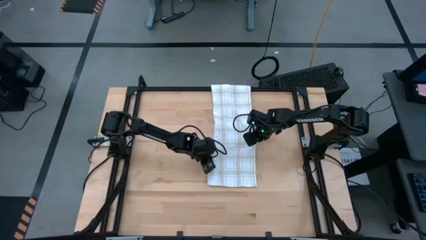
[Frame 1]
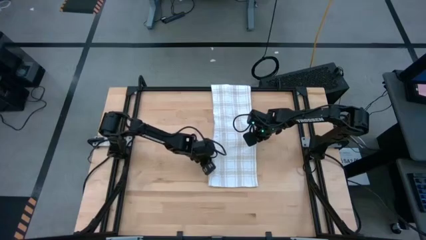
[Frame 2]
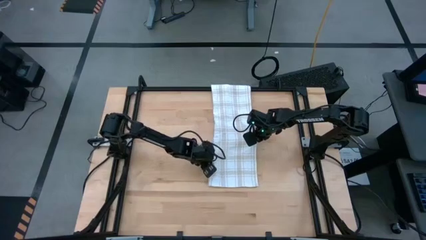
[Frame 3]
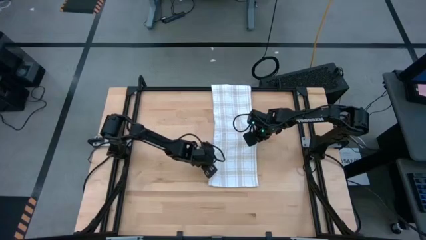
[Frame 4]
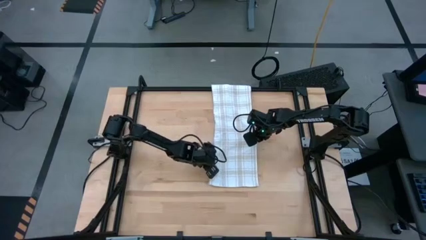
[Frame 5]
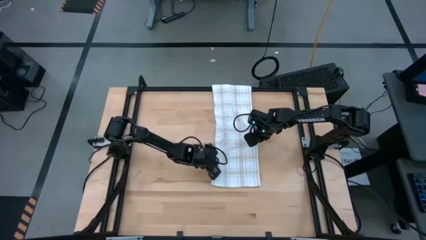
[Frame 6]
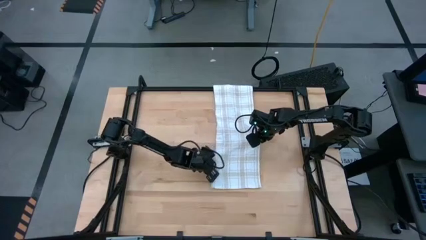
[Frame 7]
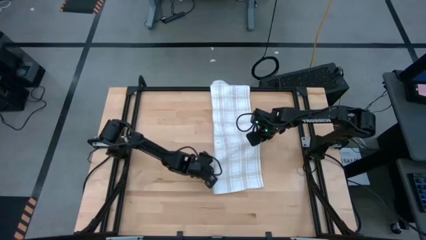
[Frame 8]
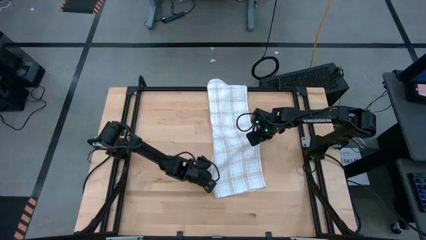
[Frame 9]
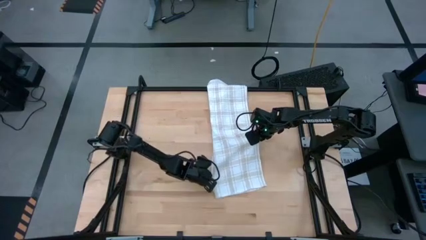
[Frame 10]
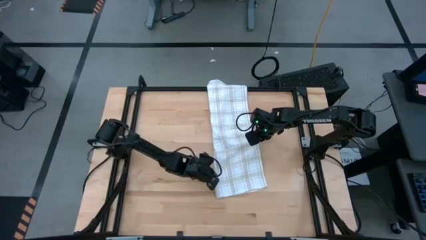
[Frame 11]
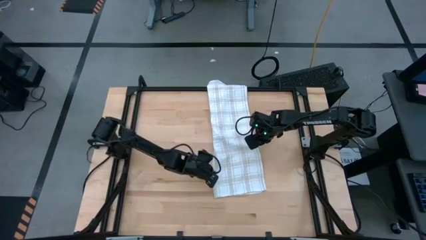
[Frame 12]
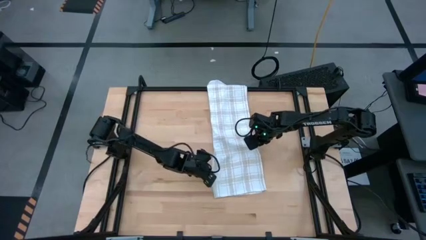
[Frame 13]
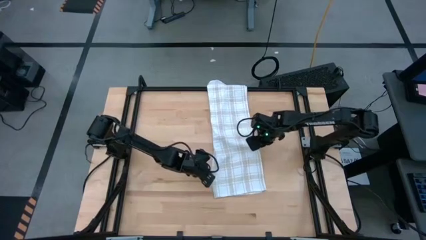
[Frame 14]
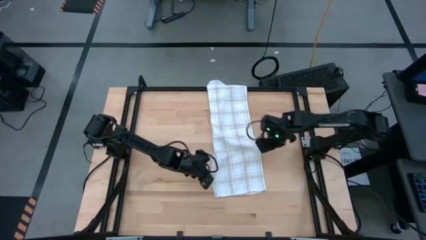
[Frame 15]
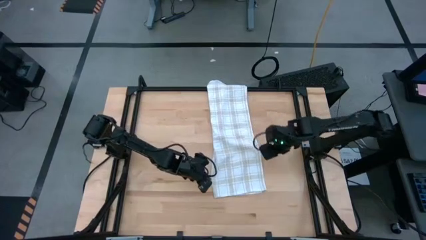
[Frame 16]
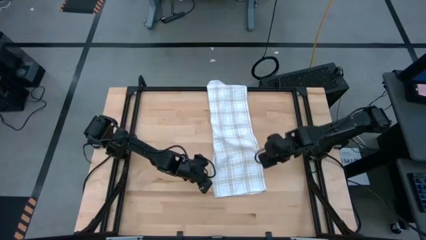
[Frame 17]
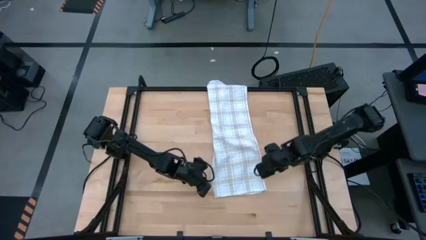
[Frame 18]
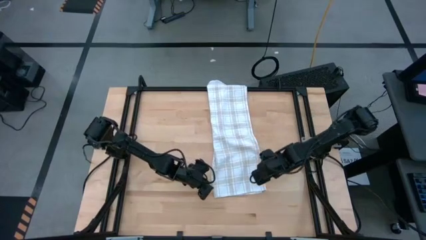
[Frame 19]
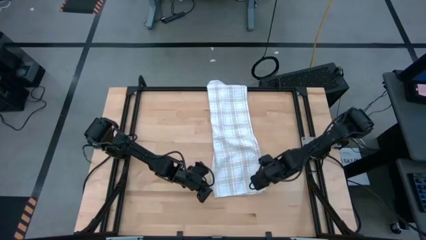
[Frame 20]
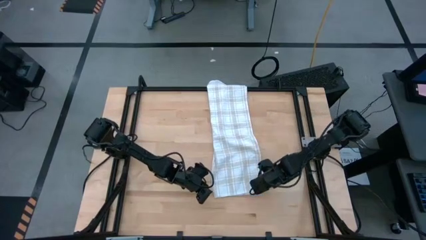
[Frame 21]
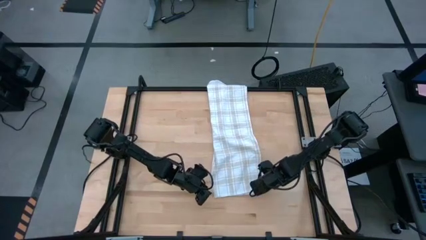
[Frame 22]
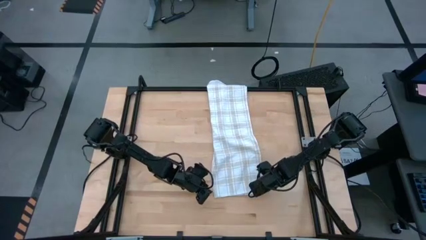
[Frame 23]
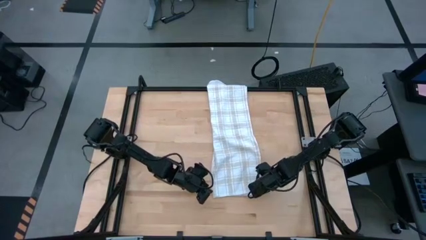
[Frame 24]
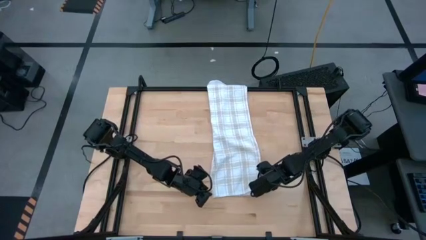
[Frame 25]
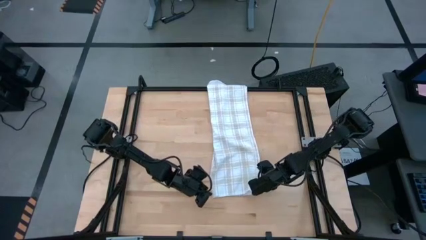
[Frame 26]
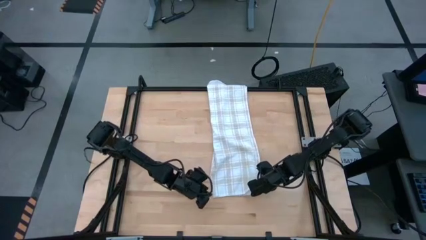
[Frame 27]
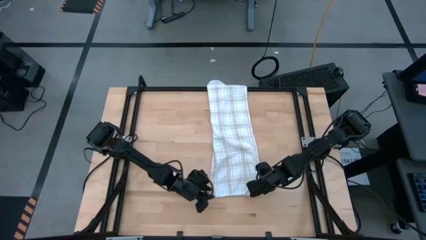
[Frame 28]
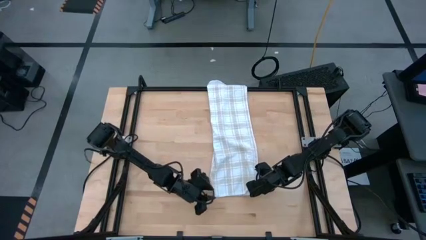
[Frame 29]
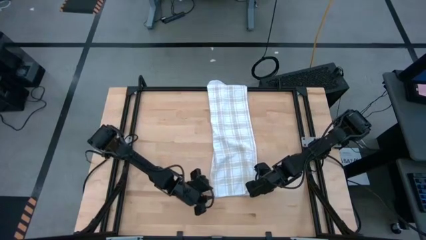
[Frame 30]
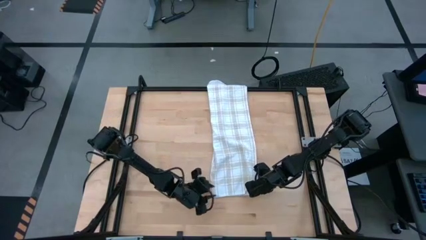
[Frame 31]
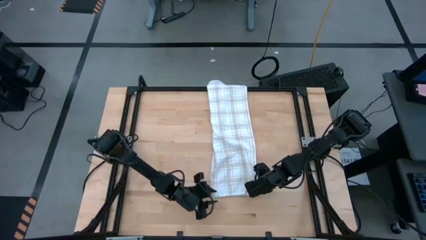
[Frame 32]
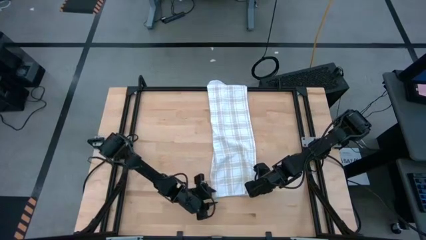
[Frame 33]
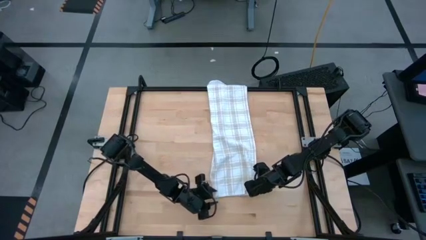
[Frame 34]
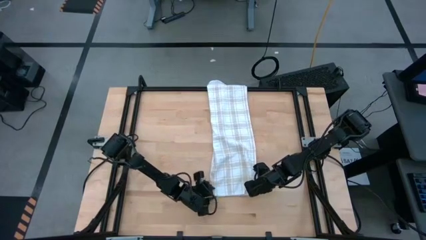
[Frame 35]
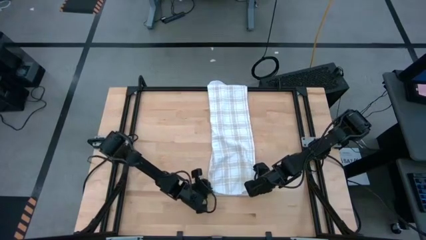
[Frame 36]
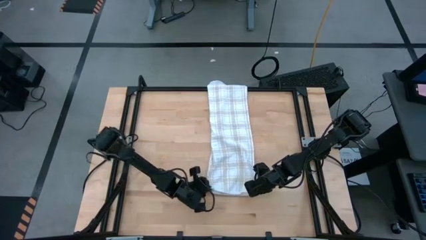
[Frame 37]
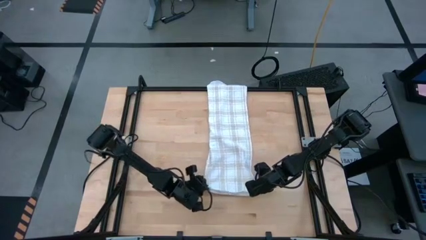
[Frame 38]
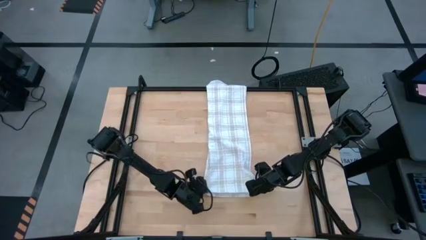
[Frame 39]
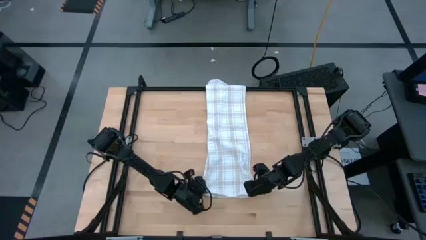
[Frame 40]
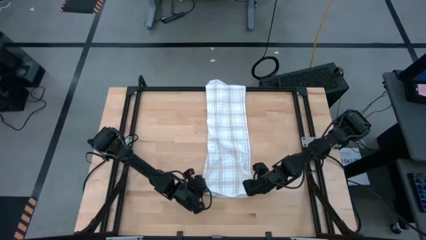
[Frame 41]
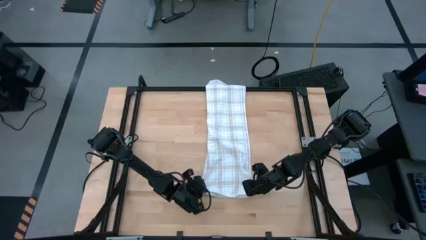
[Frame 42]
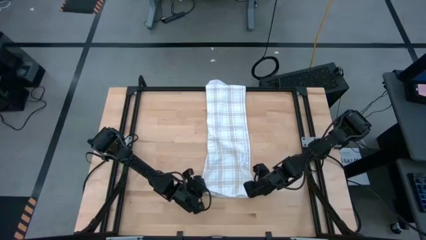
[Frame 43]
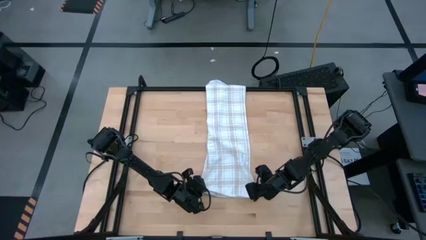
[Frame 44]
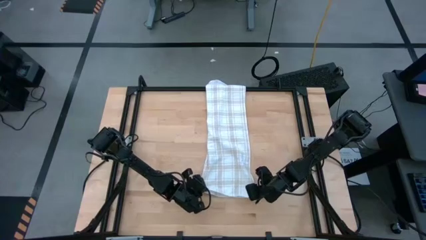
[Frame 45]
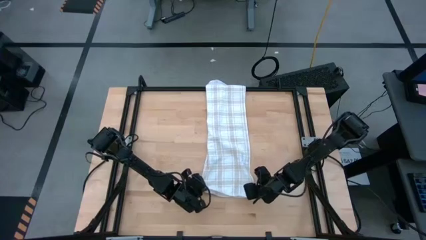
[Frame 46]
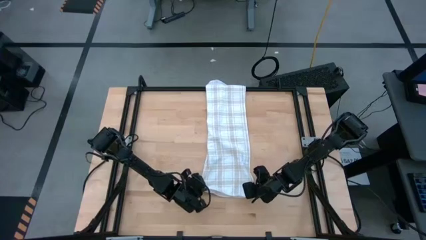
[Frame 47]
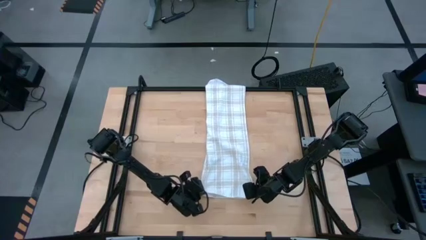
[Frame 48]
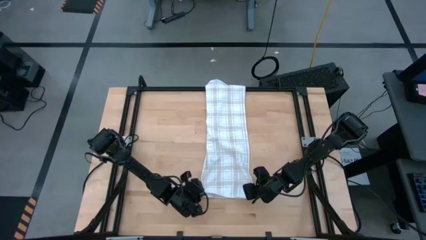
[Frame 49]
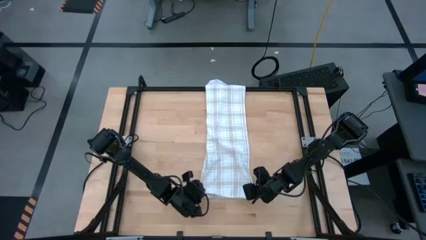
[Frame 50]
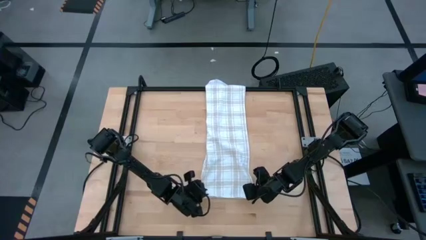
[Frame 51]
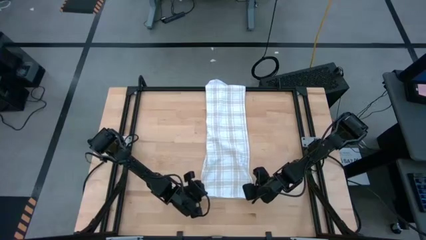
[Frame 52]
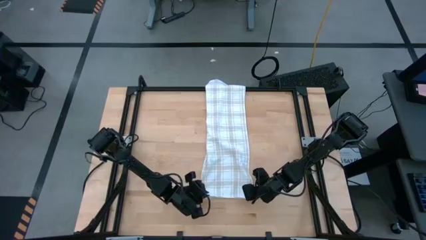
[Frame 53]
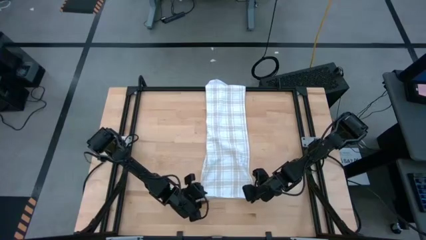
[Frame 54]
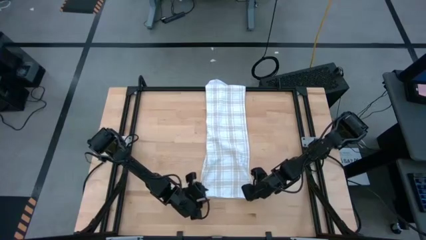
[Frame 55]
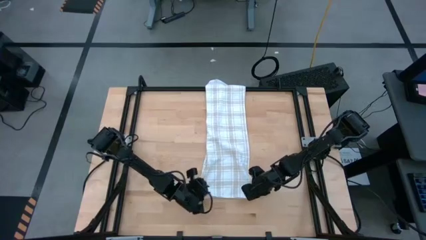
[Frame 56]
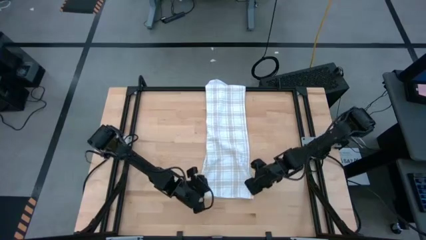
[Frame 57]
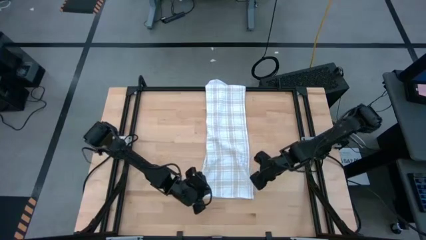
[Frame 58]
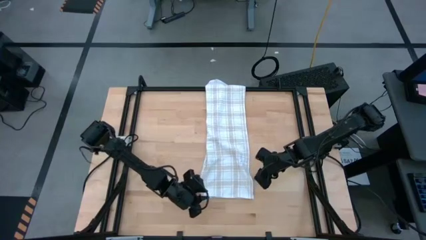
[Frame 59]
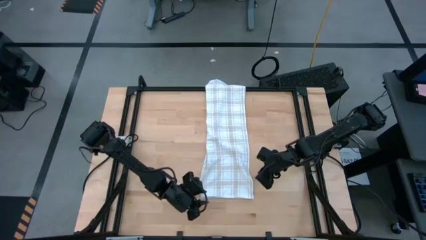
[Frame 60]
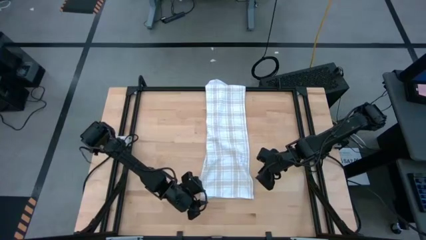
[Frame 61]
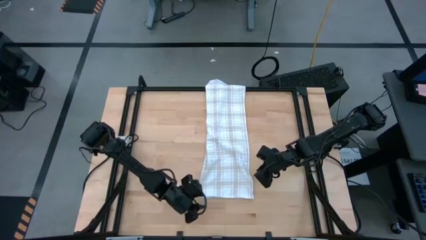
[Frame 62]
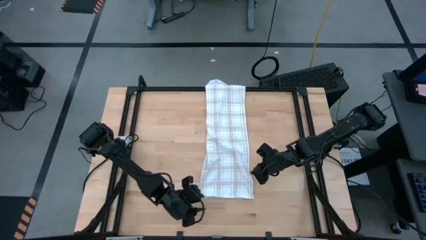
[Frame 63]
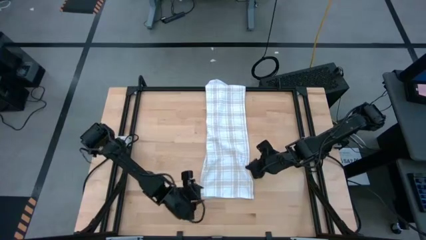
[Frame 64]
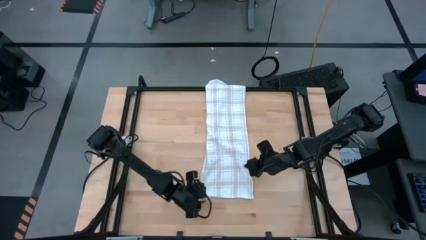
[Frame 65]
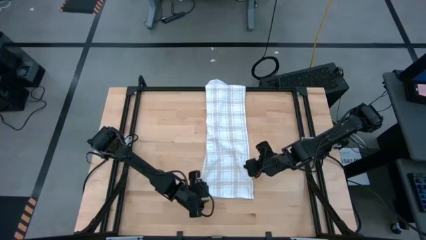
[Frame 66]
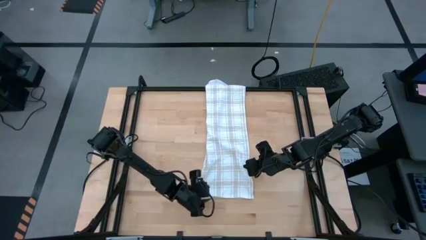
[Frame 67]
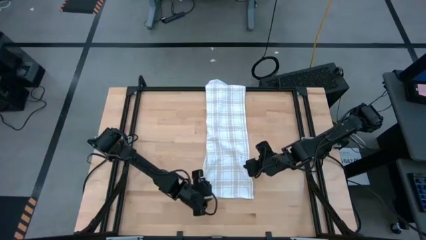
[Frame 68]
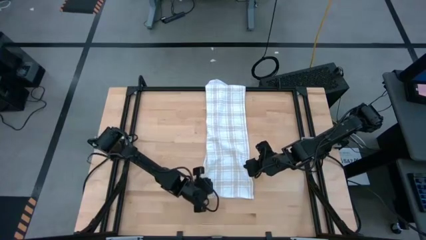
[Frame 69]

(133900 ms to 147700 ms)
Task: Roll towel into tight, uniform cylinder
Roll the white towel

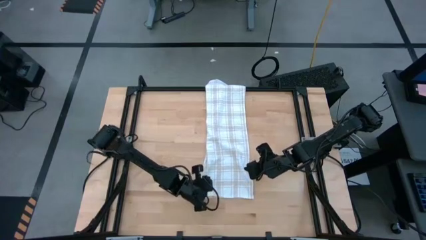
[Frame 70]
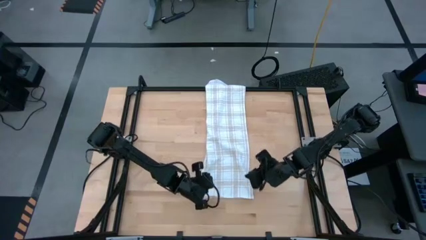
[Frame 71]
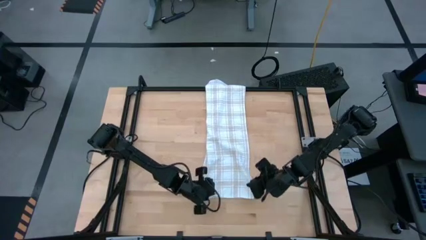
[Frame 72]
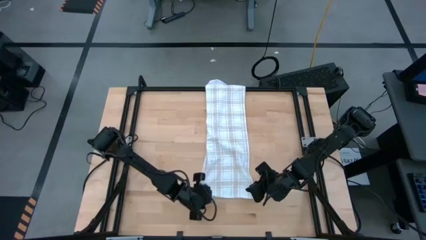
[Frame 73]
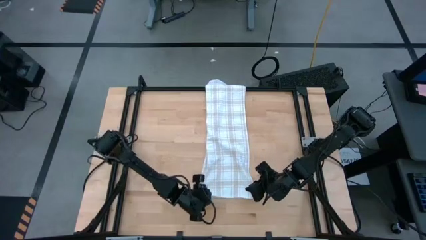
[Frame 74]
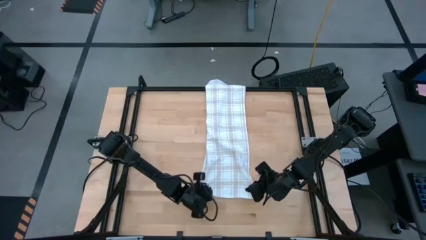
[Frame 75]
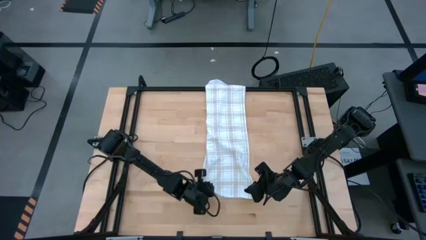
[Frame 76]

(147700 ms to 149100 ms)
Roll the white towel
